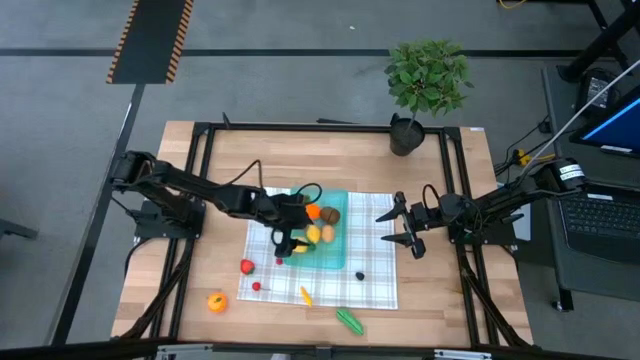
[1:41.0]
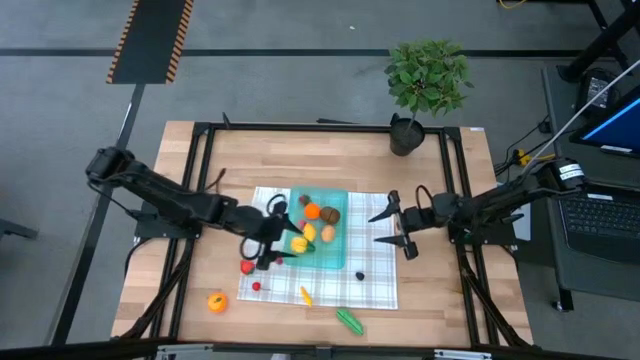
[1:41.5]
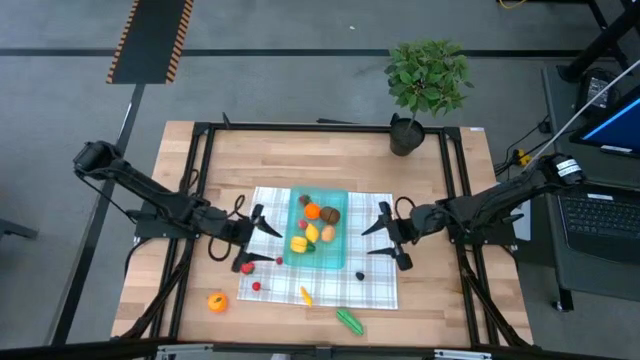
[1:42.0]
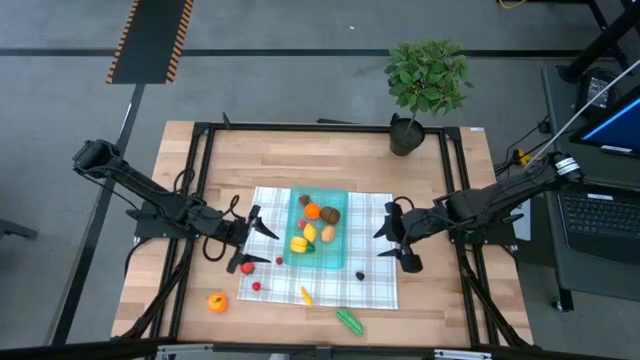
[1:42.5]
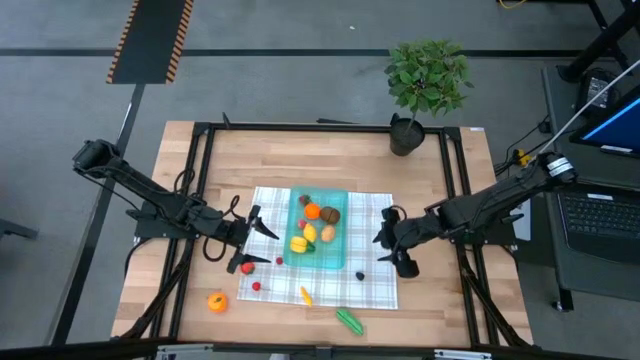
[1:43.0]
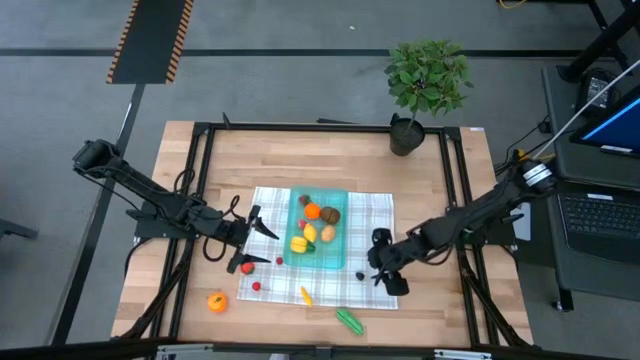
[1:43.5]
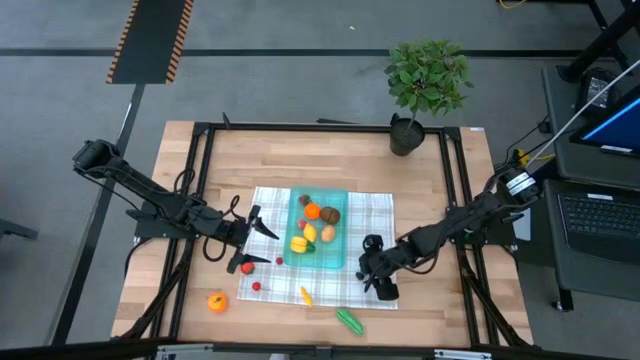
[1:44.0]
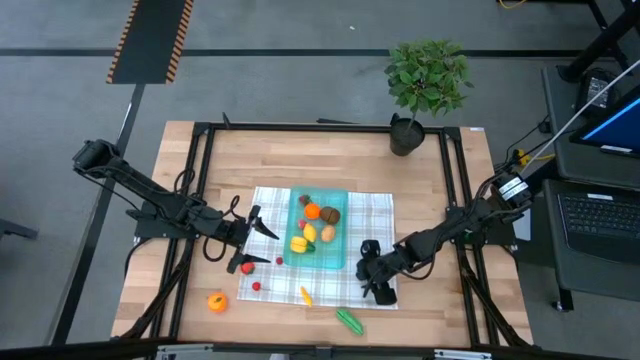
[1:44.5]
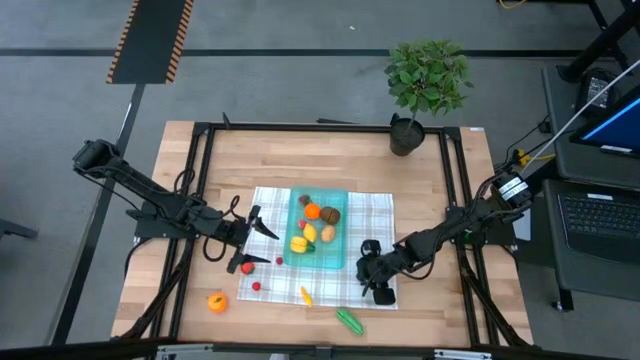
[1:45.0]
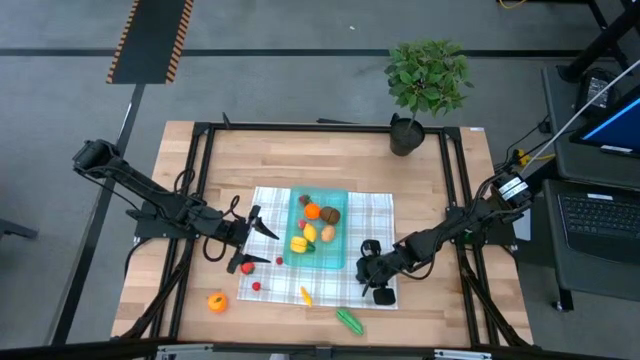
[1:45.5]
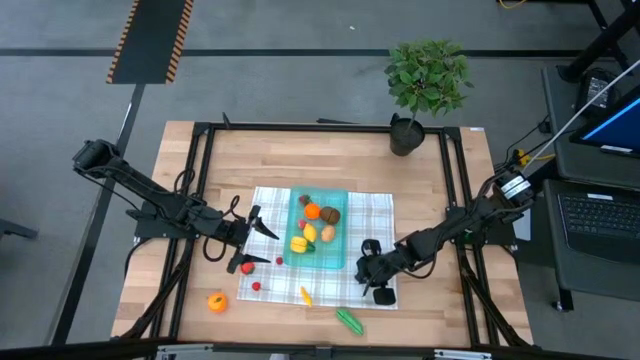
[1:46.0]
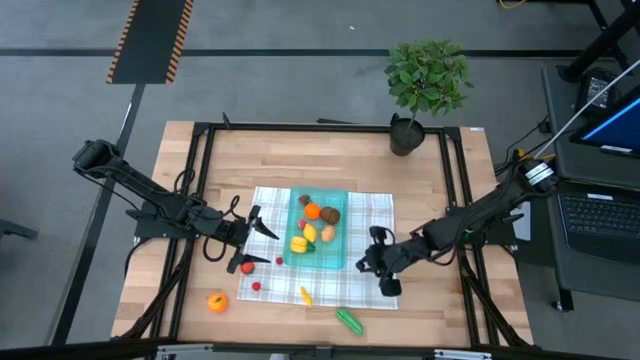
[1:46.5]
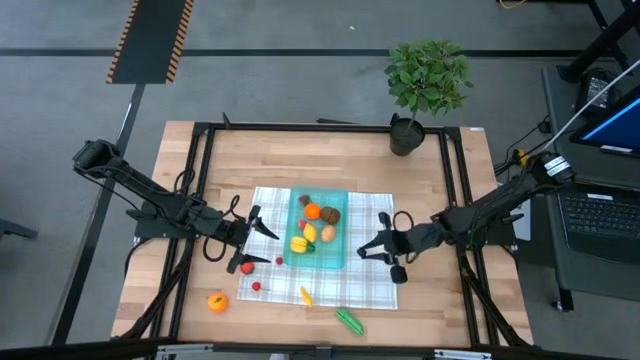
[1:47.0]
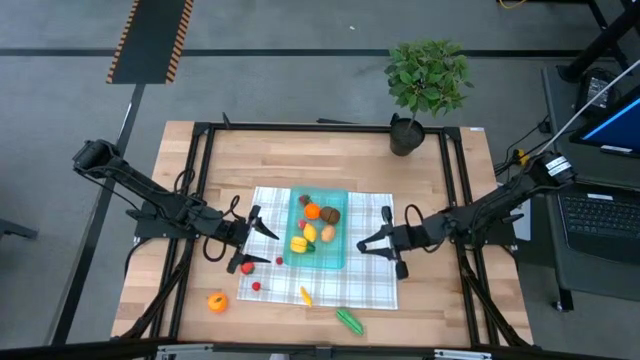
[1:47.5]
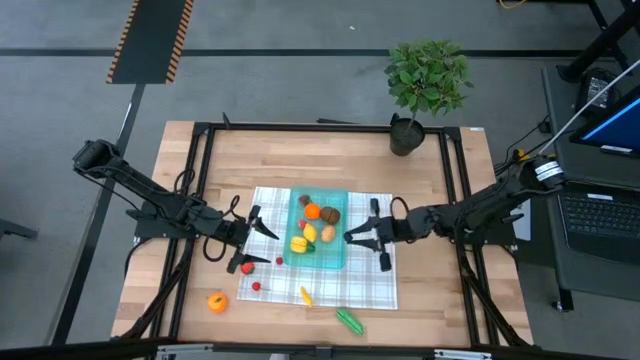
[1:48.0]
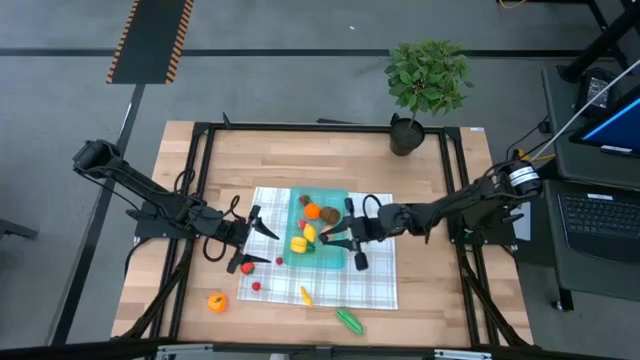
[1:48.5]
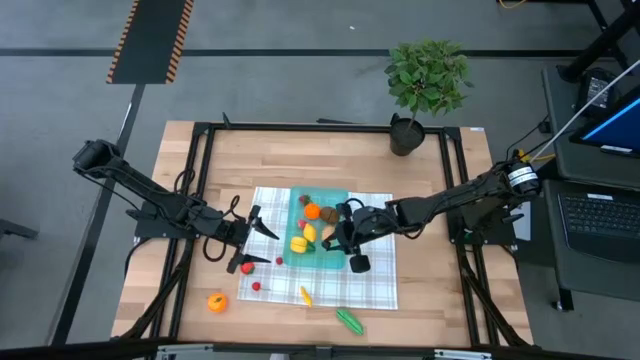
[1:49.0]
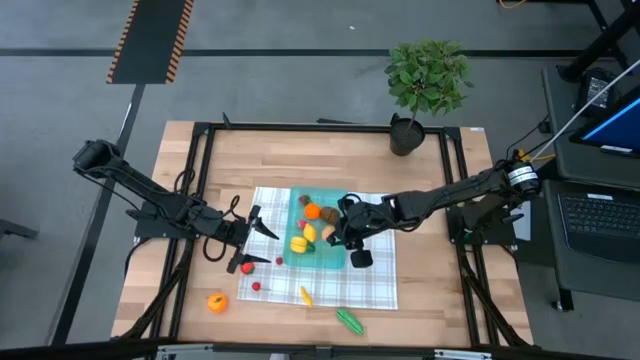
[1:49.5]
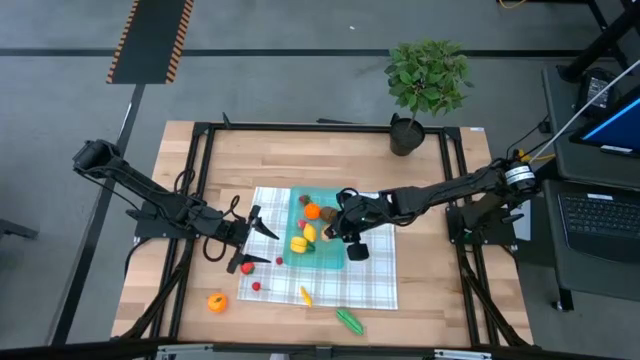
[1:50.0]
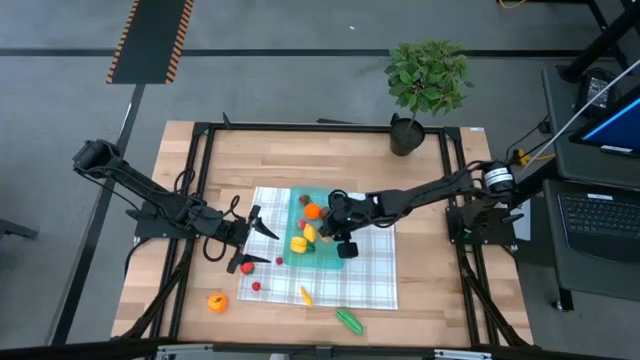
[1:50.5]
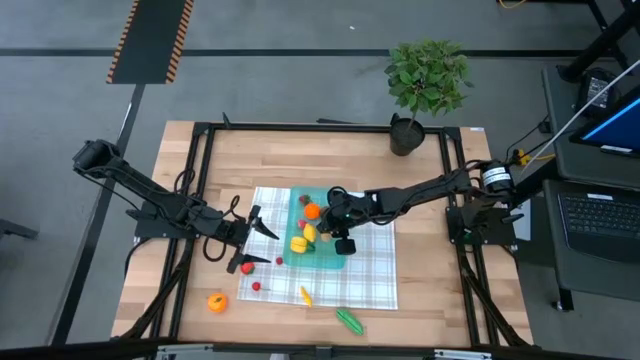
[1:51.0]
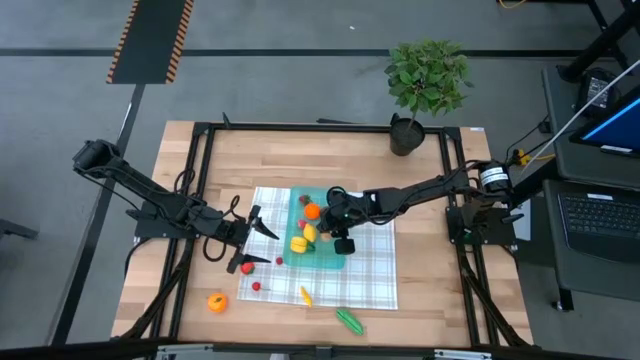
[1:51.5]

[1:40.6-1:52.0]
Task: Pick and placing Produce into tupperware
Put the blackberry into the blue bin

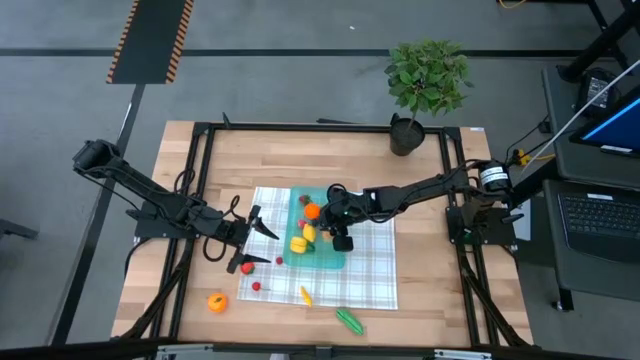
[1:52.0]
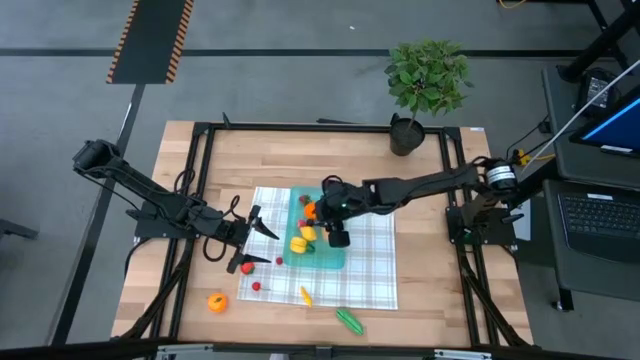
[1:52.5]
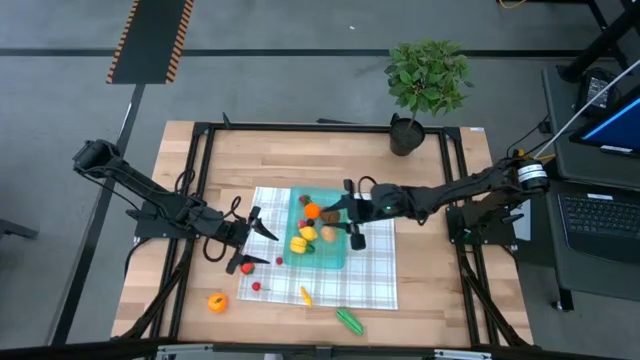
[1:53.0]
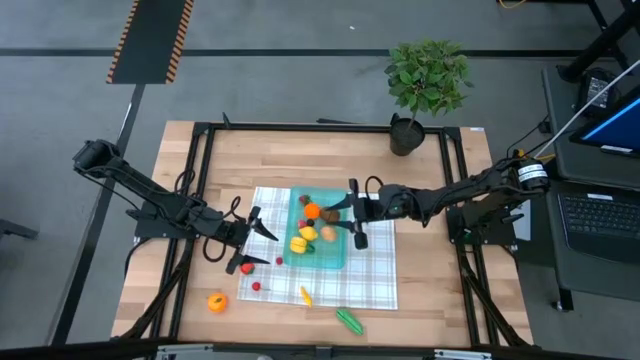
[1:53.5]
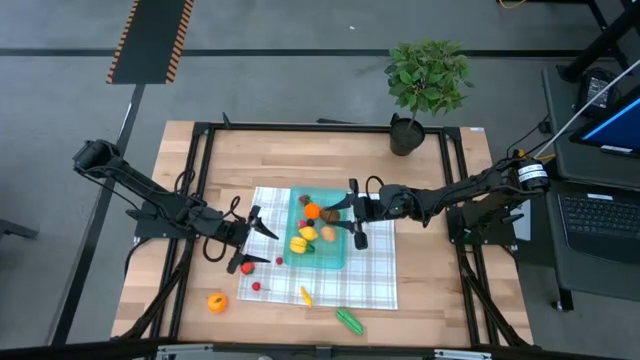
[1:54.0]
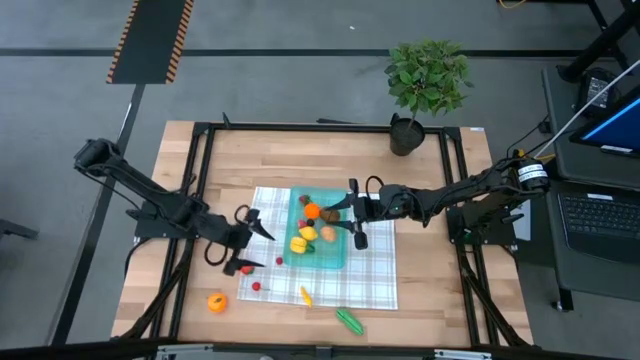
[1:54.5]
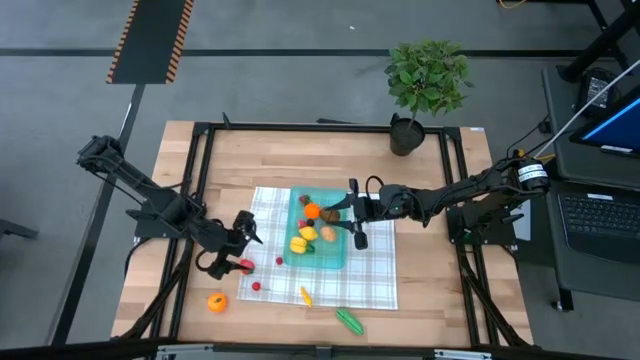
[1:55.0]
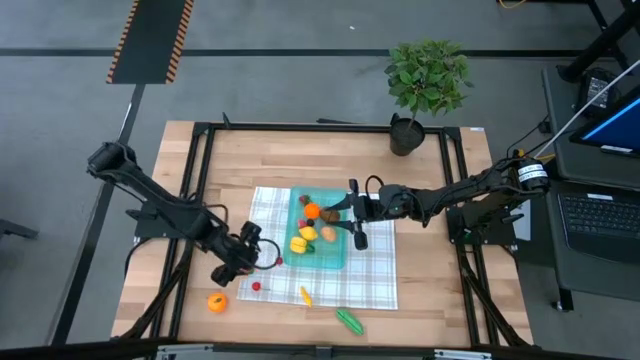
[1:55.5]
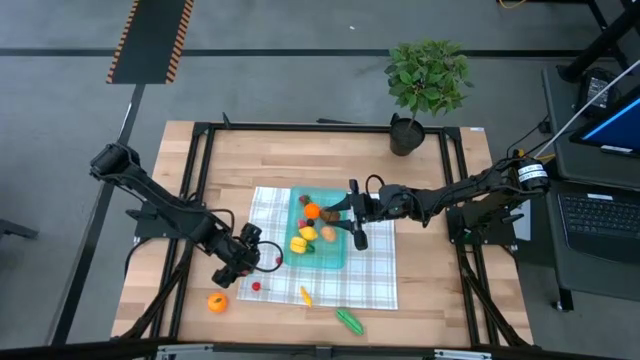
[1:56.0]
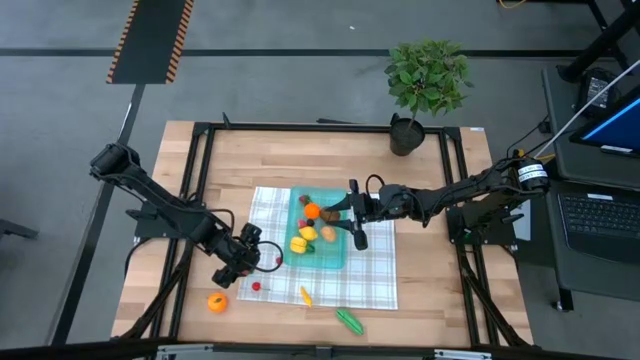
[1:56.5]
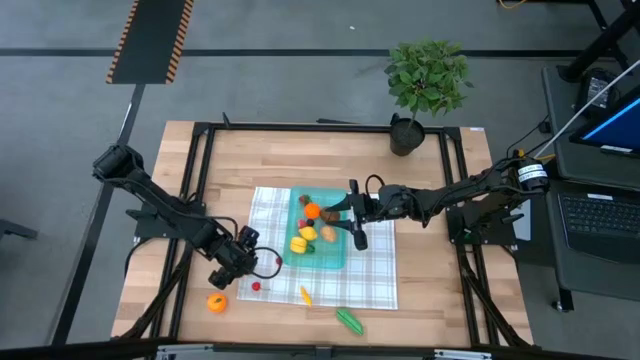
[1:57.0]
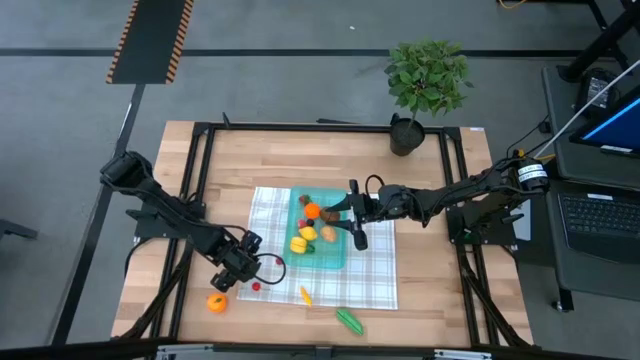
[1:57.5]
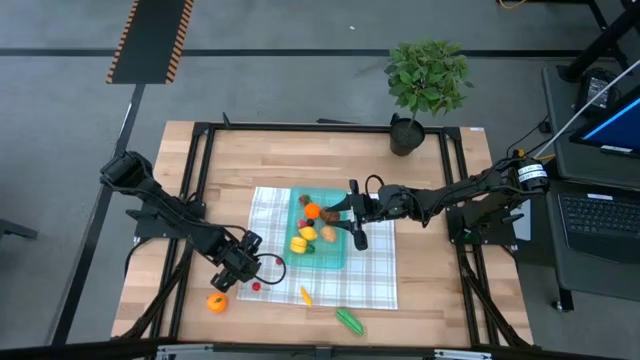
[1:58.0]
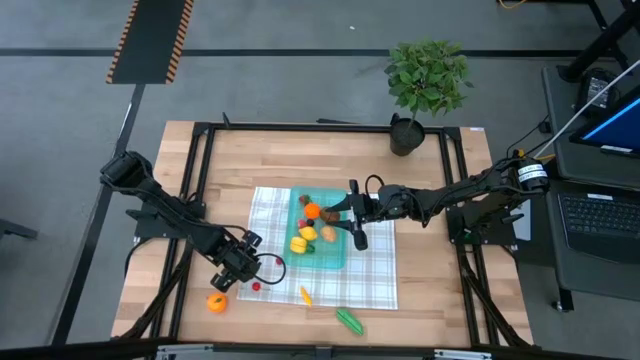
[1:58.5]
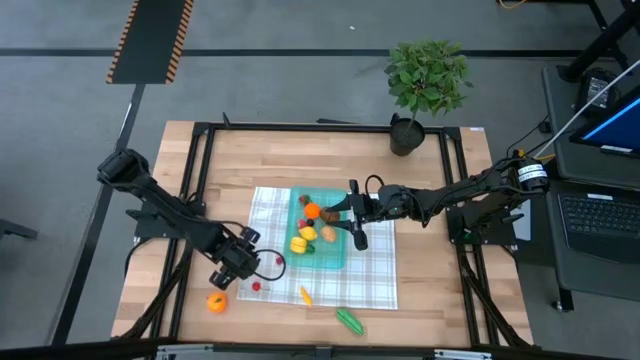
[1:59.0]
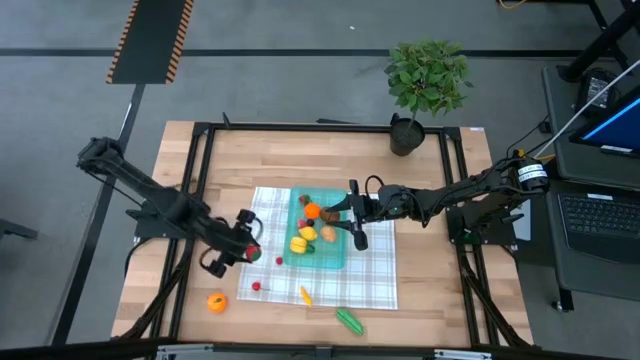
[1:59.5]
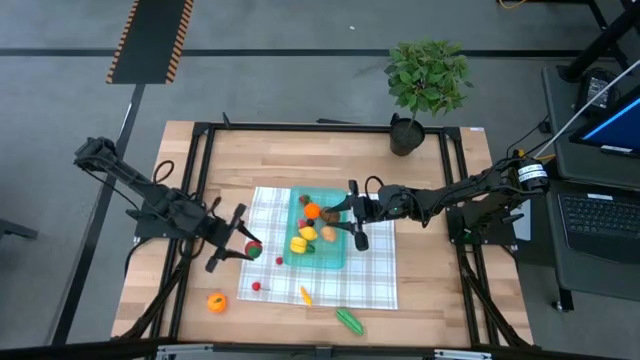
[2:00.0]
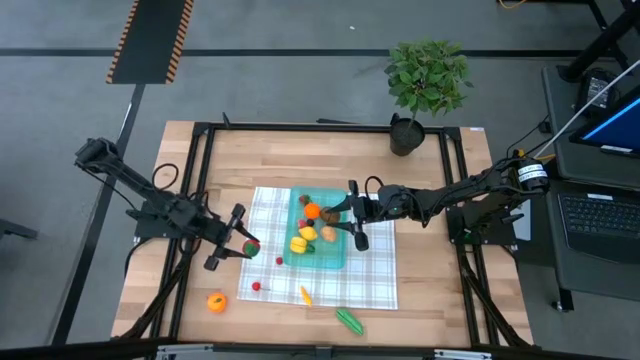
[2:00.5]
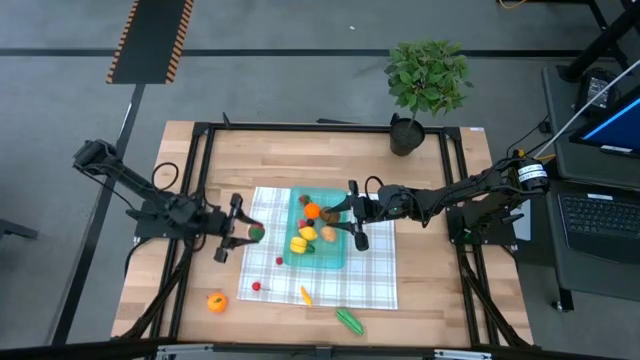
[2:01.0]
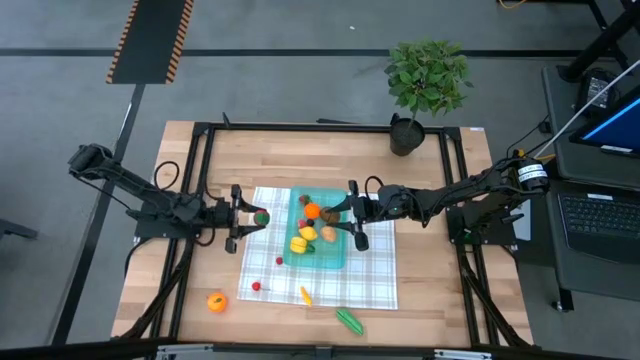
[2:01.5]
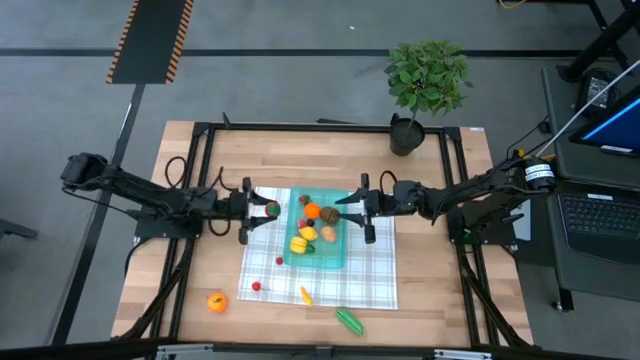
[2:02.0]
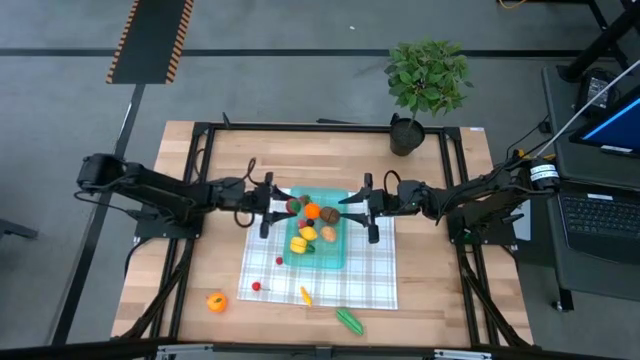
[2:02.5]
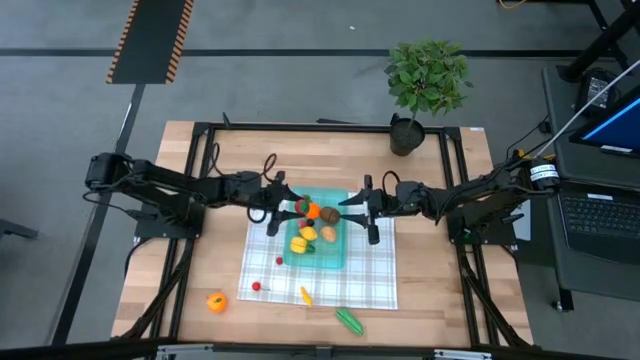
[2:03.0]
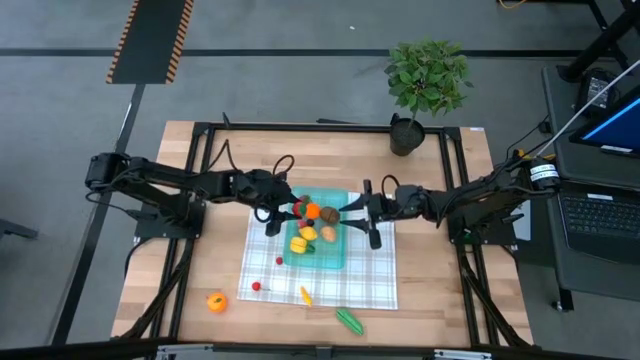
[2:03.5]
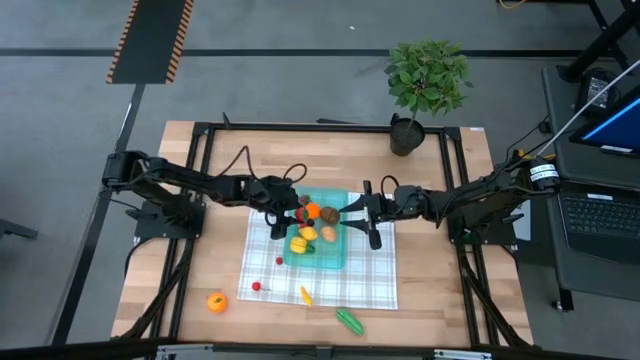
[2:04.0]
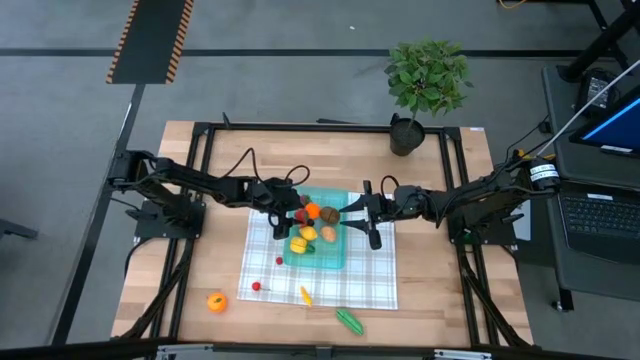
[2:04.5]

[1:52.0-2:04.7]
Put the red strawberry into the blue bin
